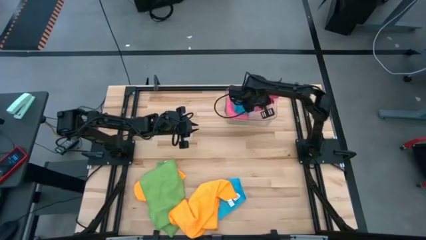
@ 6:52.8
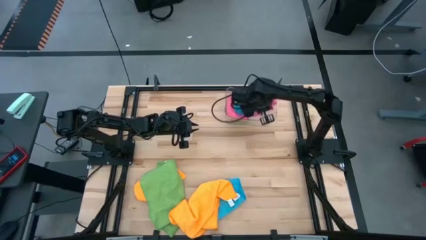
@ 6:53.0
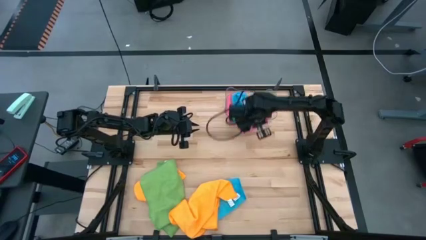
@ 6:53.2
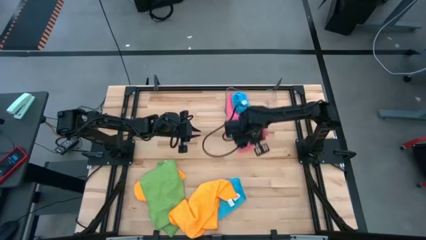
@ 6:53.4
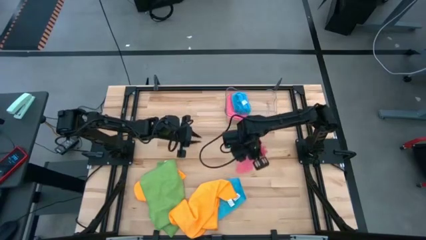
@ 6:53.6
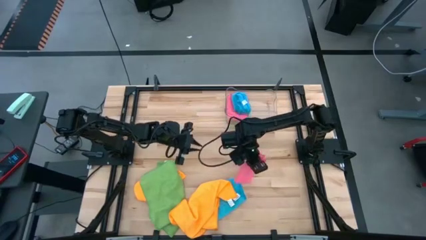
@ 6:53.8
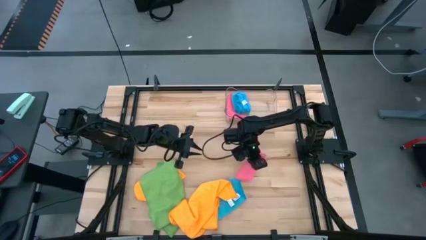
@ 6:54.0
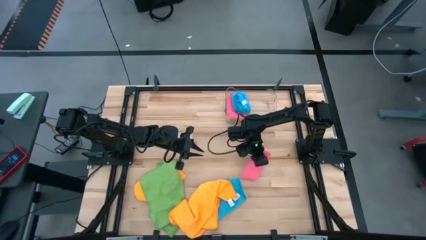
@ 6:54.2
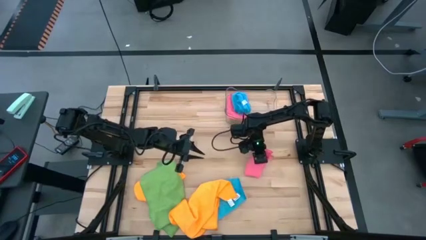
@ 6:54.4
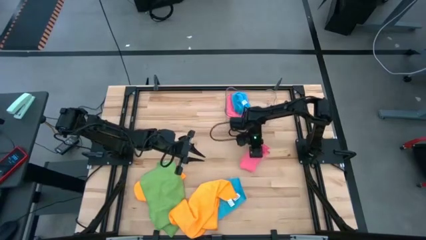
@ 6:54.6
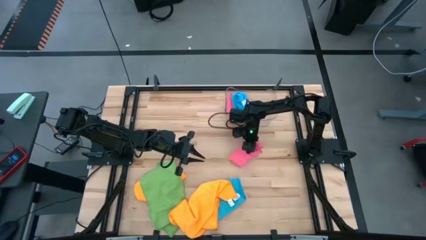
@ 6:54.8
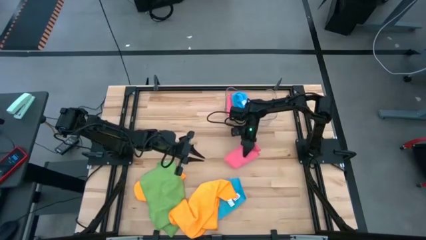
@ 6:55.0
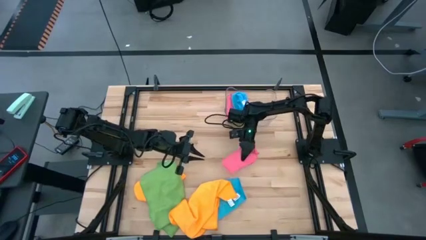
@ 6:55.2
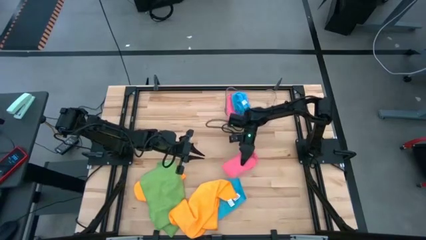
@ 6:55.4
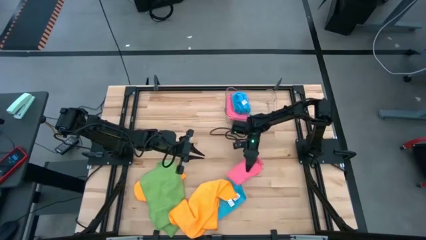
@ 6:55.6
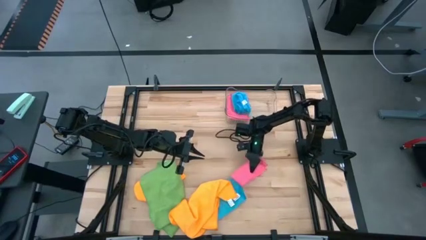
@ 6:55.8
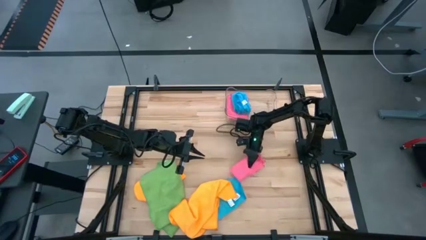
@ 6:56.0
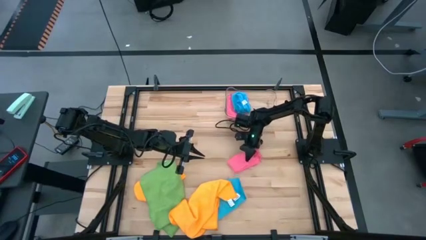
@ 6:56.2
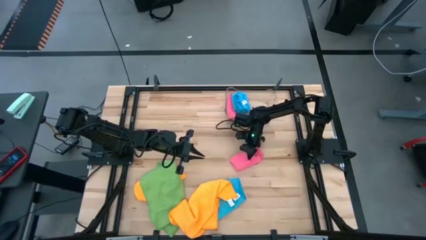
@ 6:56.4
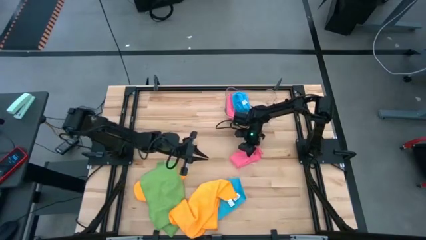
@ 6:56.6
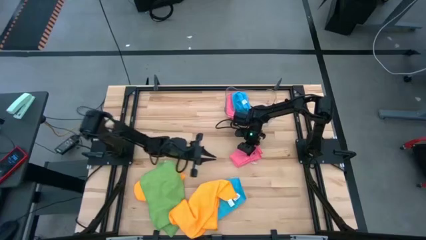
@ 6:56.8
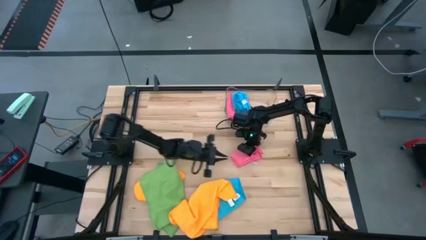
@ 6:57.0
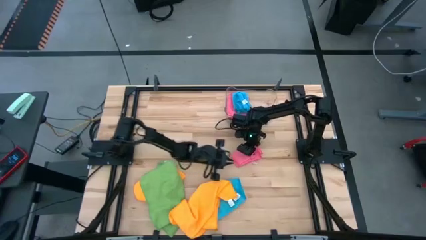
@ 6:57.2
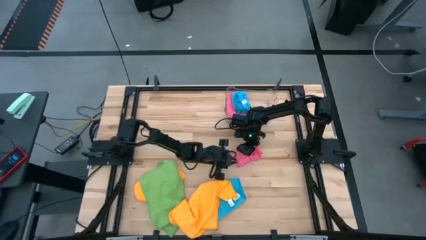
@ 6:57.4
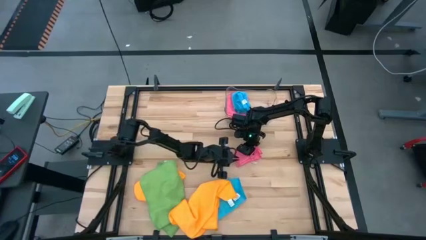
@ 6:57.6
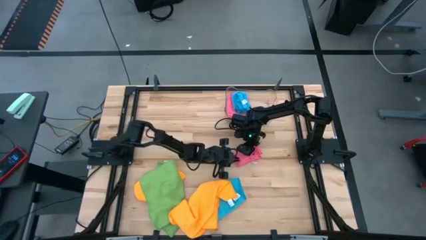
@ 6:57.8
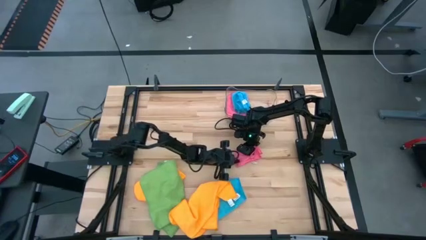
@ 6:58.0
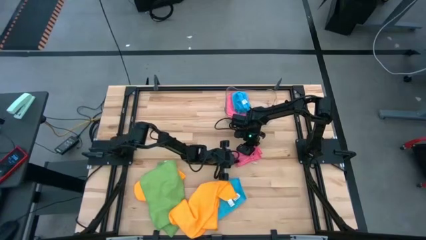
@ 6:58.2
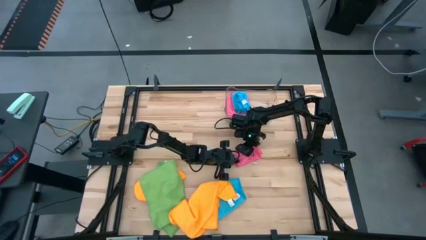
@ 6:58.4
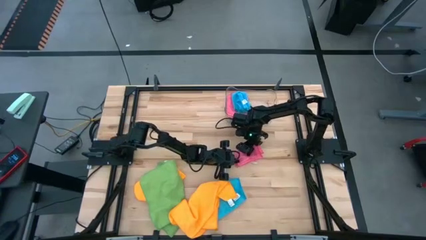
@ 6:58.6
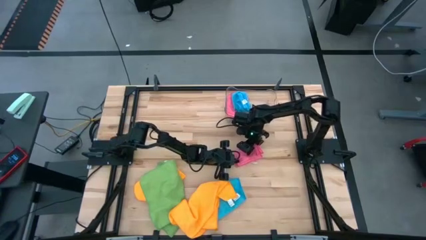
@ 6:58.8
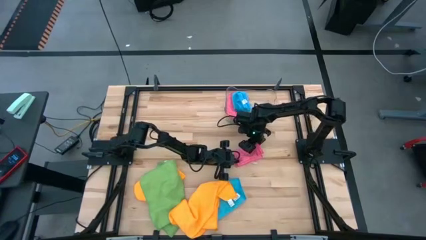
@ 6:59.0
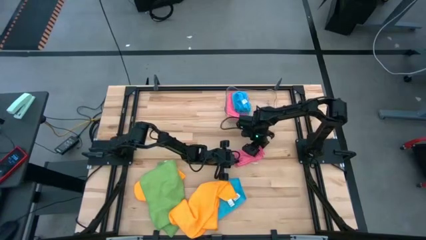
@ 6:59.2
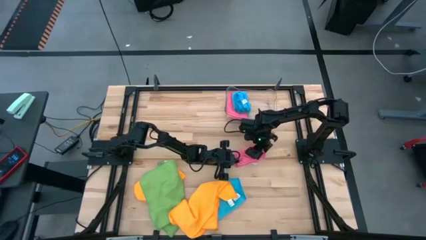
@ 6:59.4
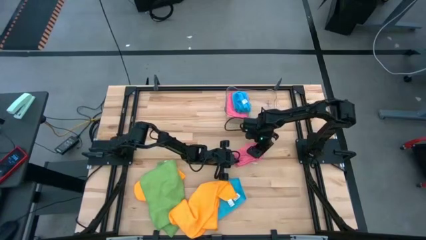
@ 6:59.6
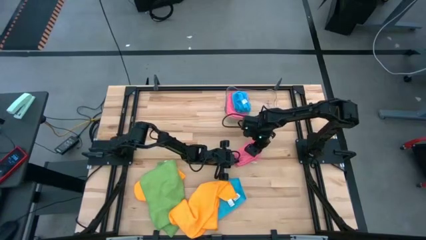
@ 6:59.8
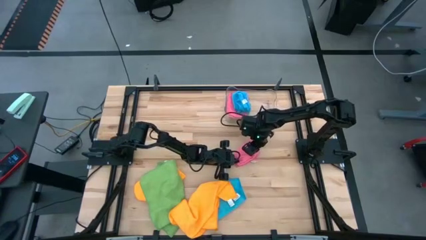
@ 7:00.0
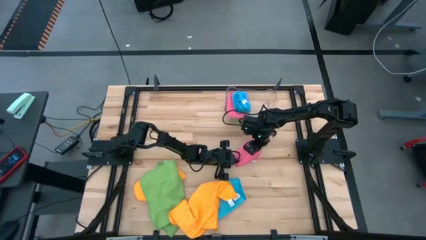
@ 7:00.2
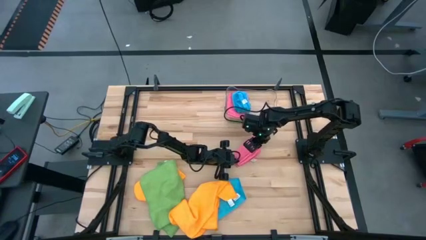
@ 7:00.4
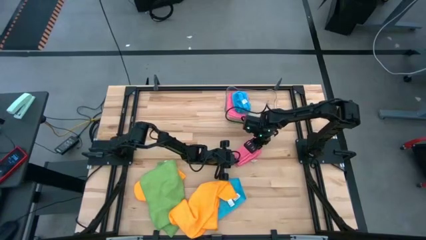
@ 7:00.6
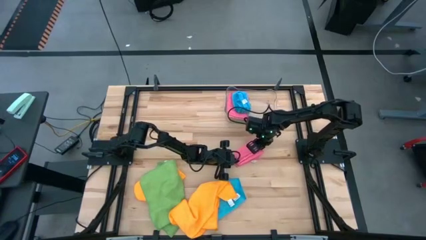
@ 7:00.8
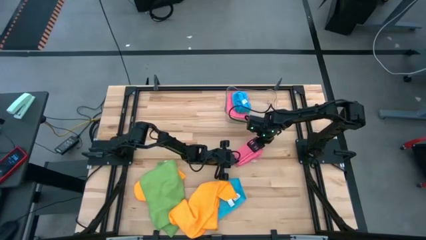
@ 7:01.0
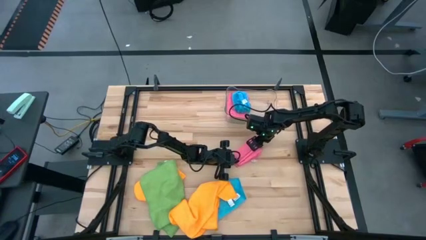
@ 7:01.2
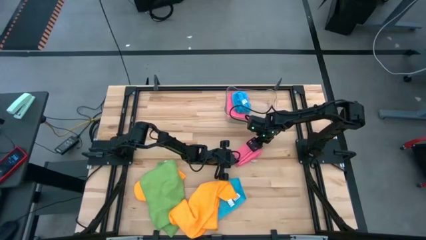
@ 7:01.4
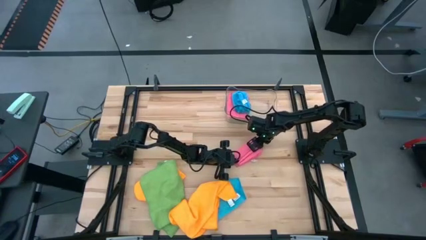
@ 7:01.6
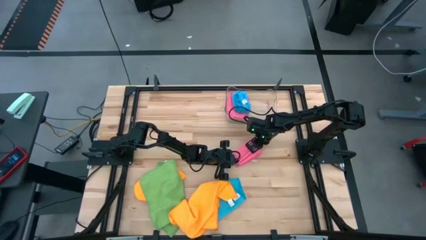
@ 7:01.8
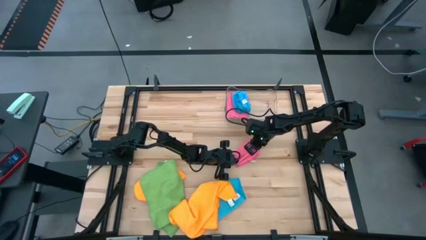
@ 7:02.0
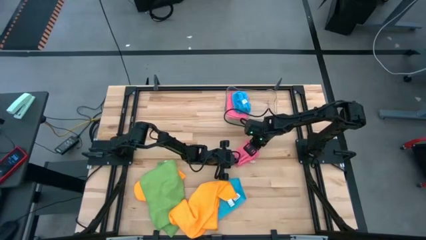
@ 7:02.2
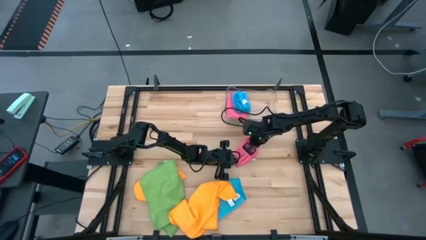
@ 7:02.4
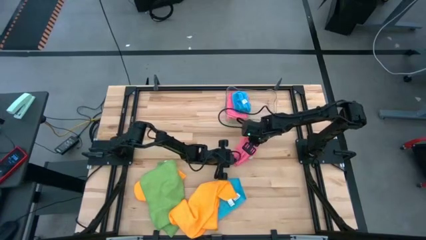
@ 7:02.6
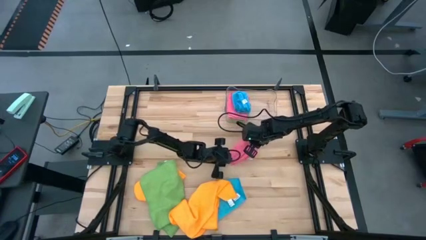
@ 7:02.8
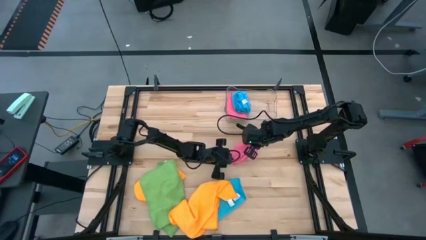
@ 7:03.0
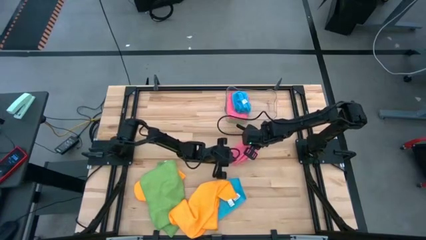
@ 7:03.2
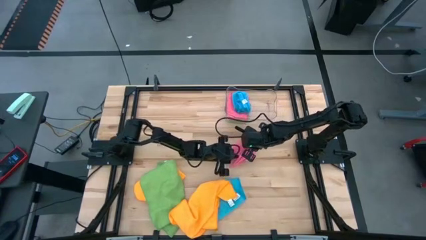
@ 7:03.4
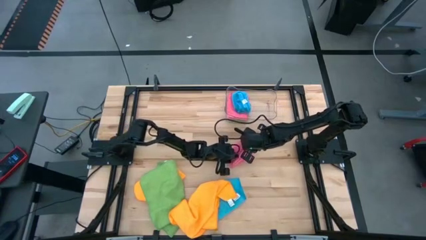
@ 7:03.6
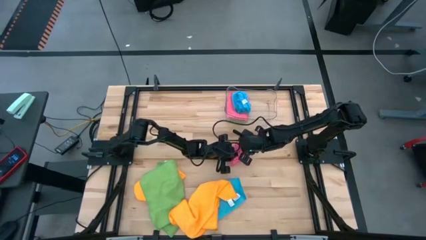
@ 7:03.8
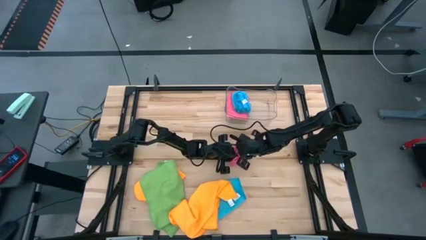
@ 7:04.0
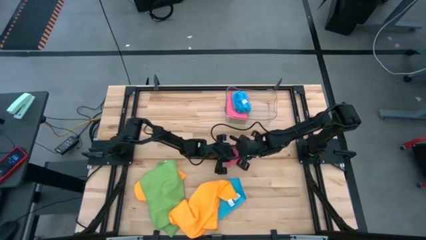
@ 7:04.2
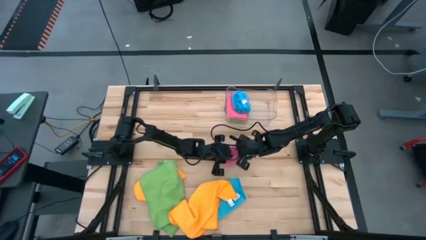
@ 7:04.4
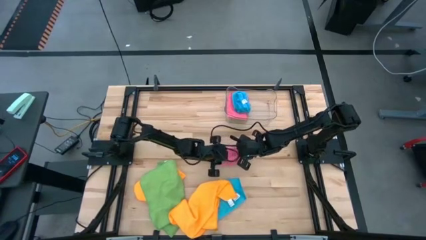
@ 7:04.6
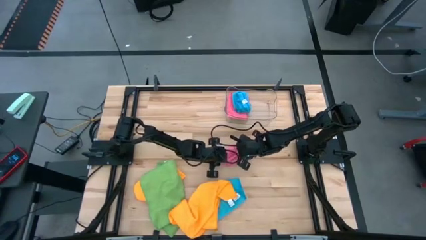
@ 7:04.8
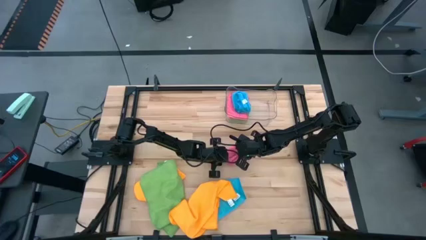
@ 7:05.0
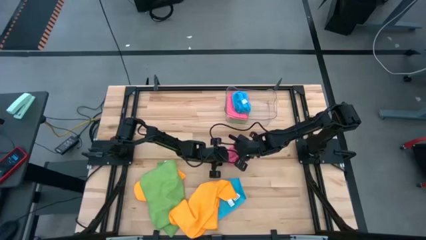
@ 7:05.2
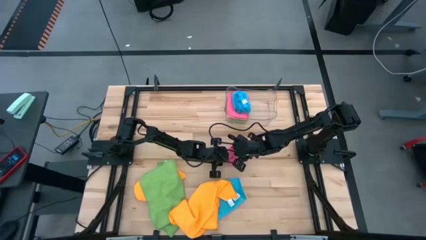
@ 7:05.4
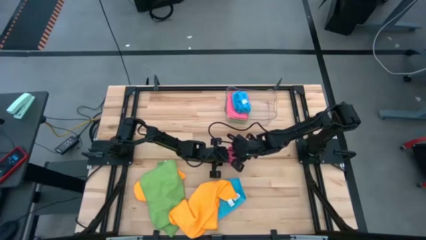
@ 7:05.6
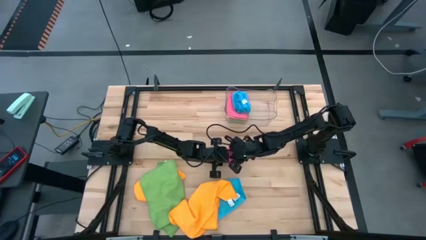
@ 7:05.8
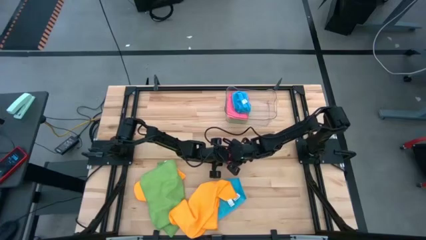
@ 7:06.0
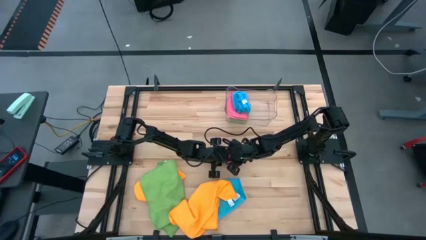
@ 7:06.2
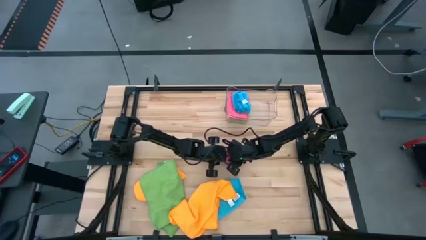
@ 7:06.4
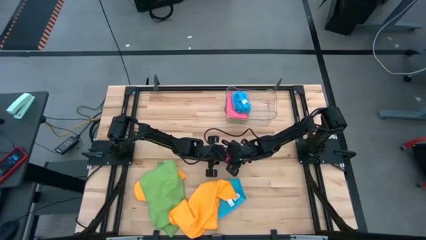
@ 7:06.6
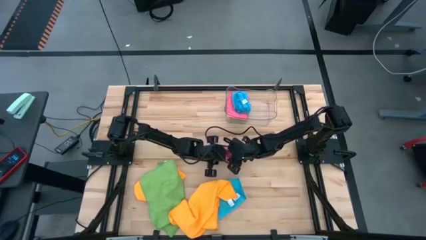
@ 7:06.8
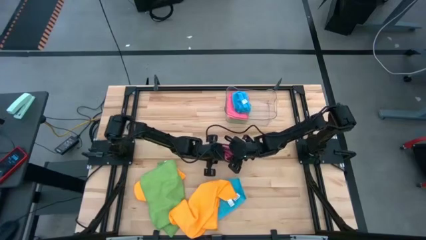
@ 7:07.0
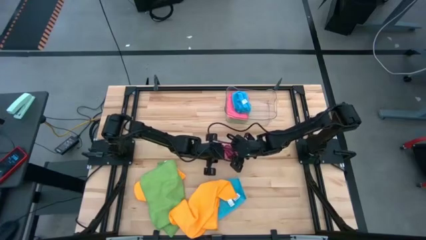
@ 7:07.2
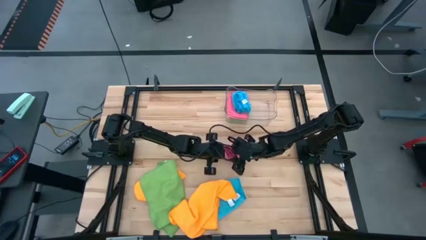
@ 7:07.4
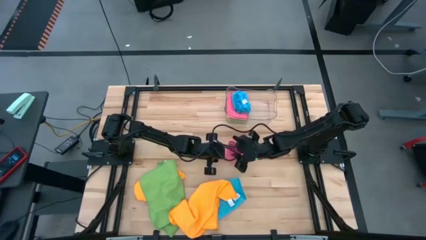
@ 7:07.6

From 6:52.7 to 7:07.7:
Task: Fold microfiber towels
Fold the pink towel
